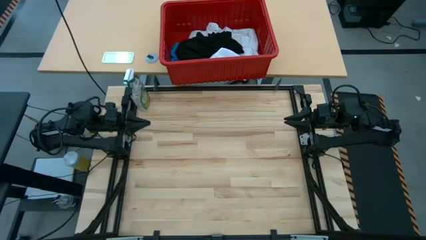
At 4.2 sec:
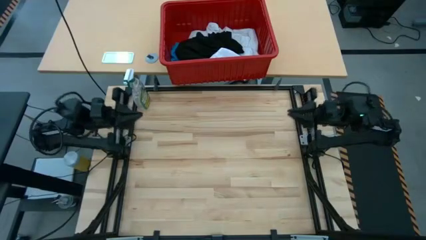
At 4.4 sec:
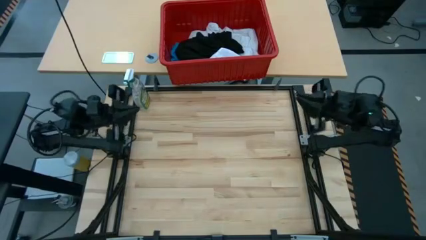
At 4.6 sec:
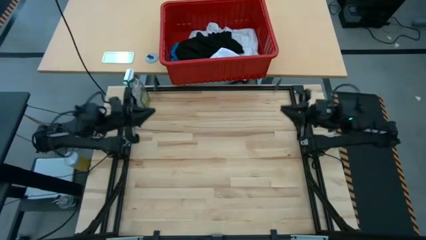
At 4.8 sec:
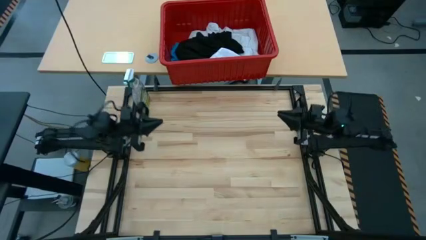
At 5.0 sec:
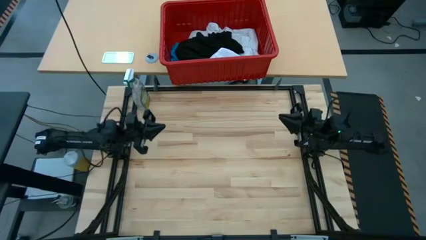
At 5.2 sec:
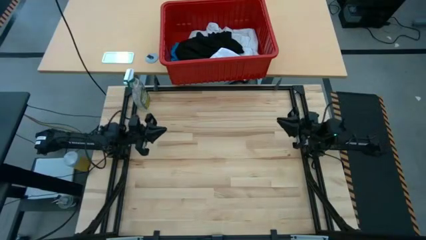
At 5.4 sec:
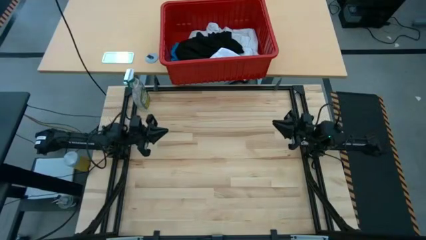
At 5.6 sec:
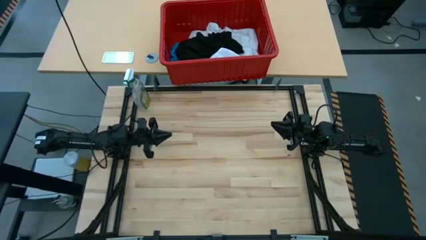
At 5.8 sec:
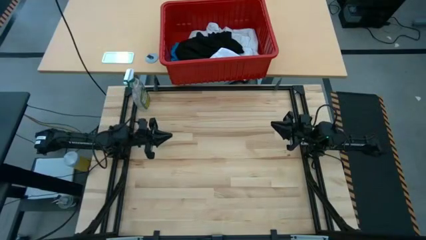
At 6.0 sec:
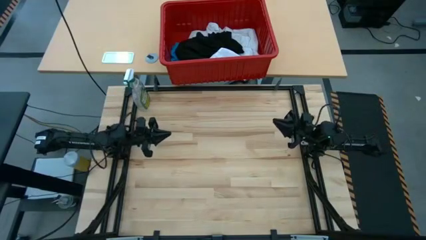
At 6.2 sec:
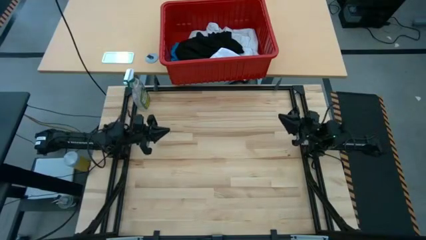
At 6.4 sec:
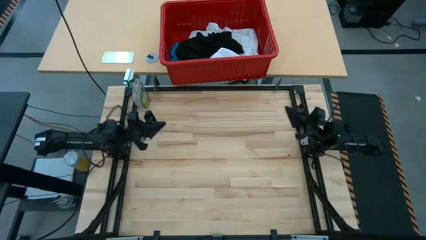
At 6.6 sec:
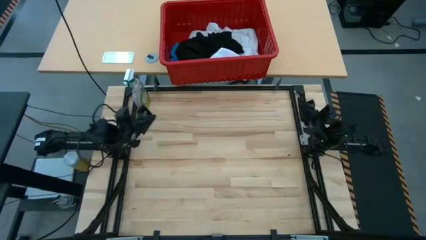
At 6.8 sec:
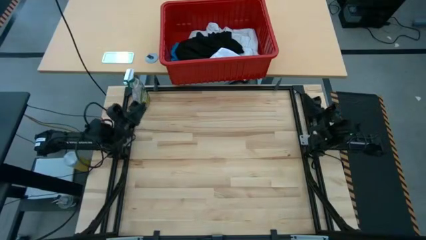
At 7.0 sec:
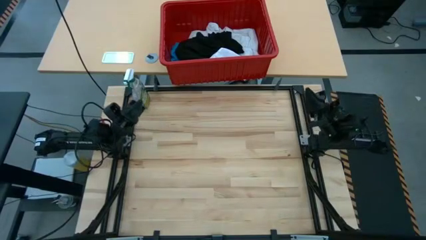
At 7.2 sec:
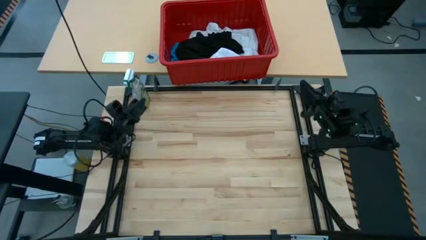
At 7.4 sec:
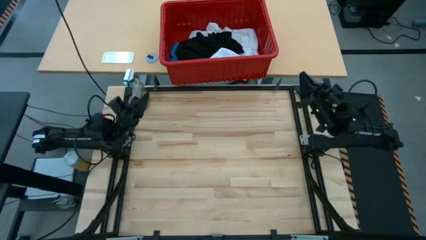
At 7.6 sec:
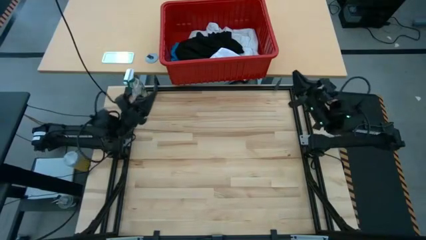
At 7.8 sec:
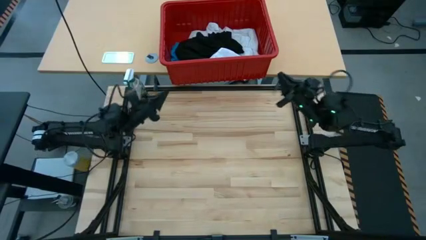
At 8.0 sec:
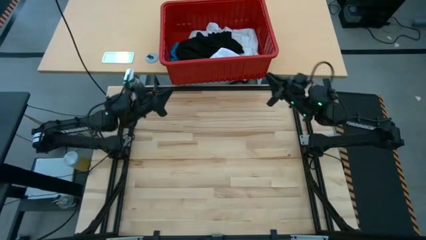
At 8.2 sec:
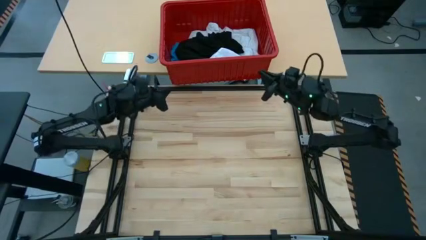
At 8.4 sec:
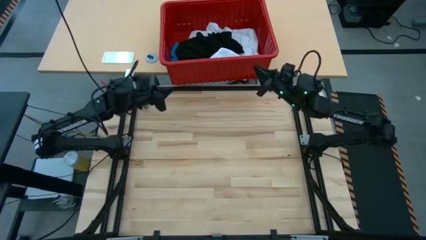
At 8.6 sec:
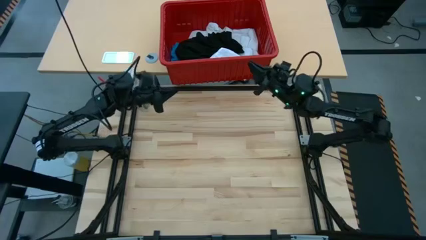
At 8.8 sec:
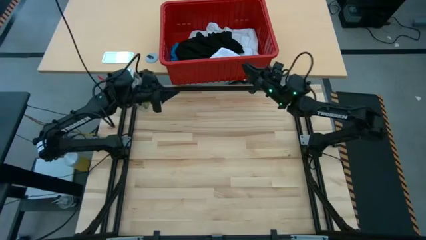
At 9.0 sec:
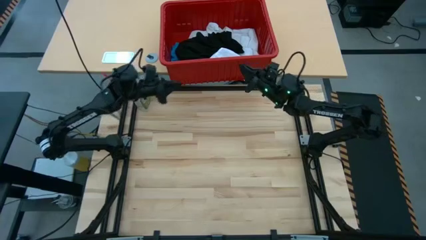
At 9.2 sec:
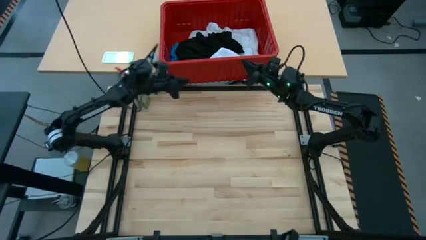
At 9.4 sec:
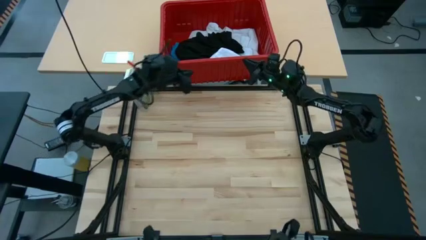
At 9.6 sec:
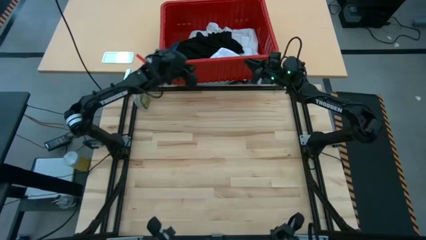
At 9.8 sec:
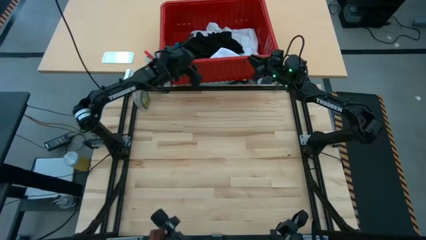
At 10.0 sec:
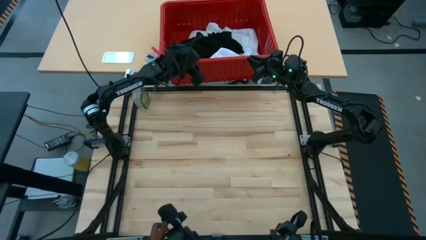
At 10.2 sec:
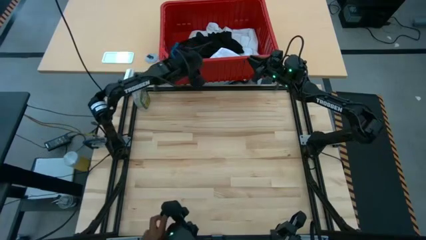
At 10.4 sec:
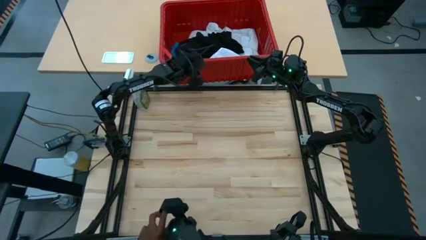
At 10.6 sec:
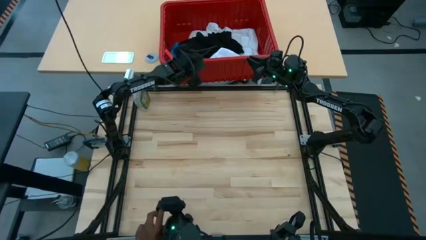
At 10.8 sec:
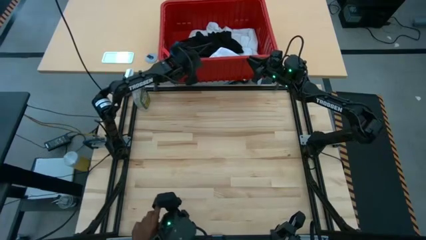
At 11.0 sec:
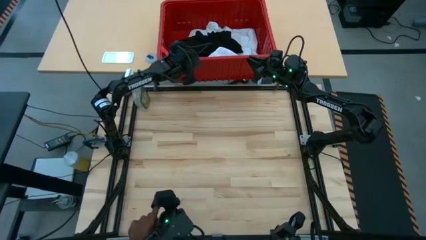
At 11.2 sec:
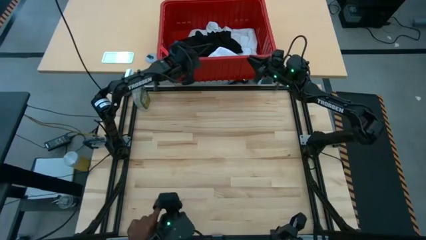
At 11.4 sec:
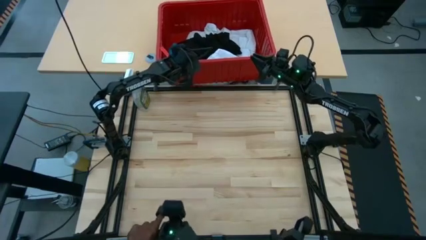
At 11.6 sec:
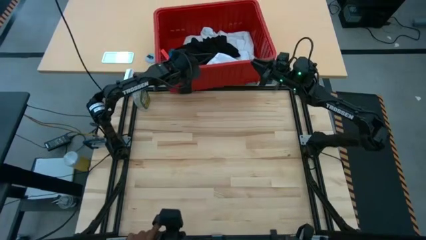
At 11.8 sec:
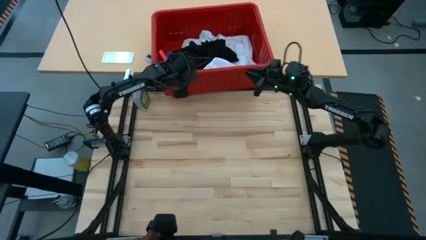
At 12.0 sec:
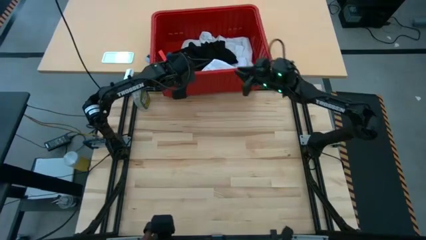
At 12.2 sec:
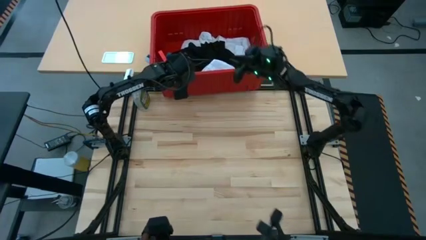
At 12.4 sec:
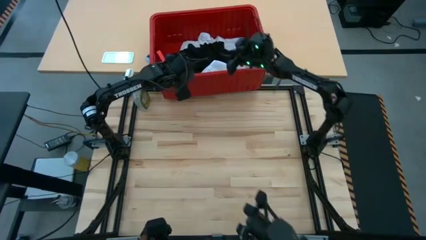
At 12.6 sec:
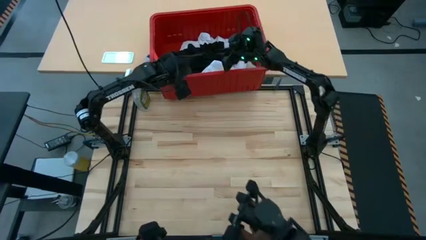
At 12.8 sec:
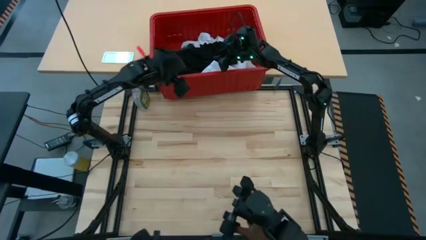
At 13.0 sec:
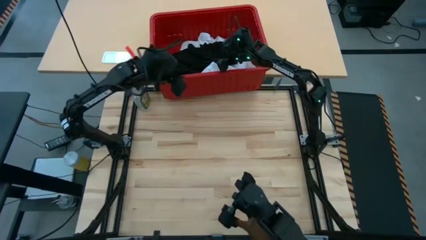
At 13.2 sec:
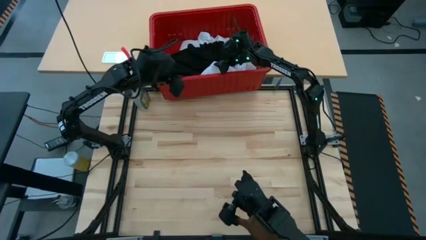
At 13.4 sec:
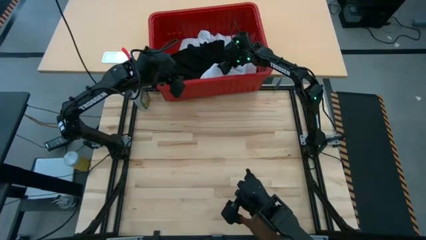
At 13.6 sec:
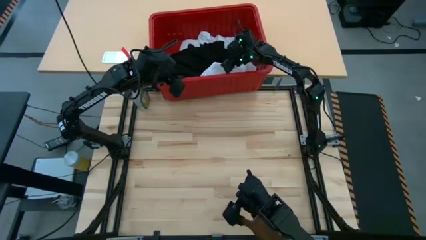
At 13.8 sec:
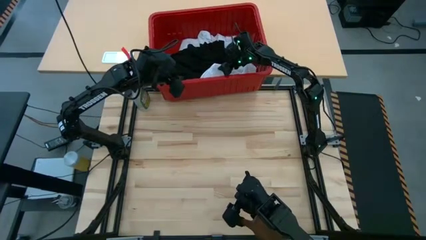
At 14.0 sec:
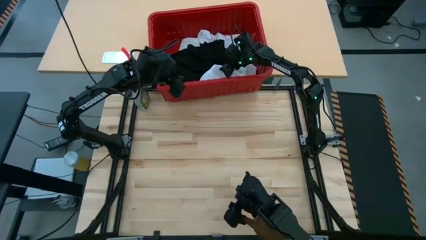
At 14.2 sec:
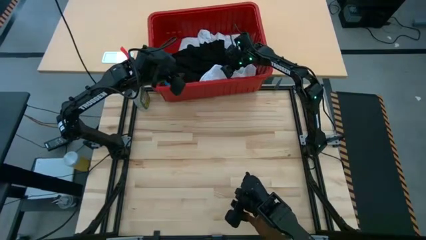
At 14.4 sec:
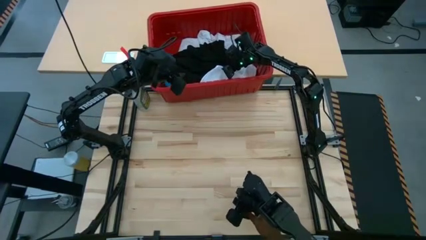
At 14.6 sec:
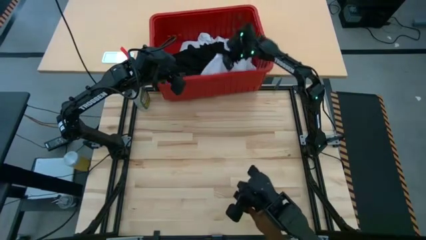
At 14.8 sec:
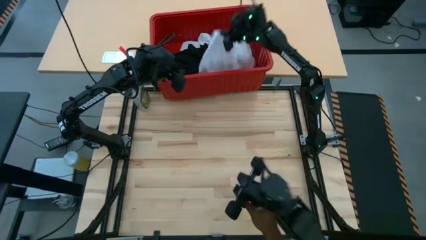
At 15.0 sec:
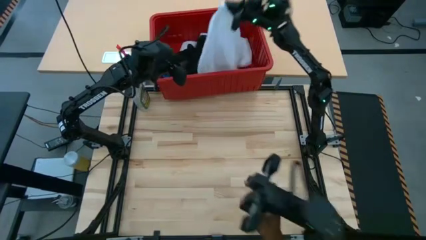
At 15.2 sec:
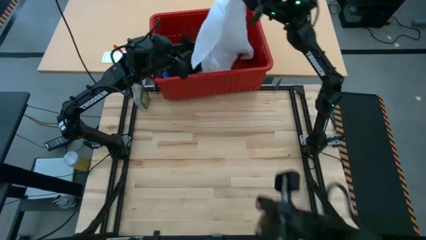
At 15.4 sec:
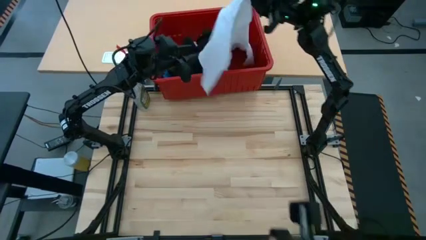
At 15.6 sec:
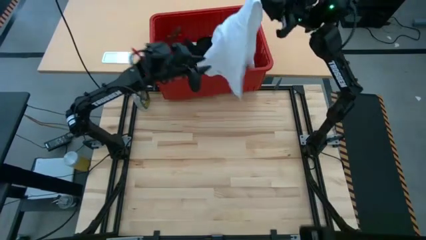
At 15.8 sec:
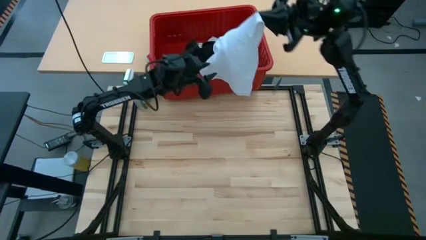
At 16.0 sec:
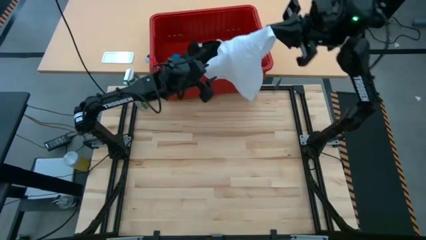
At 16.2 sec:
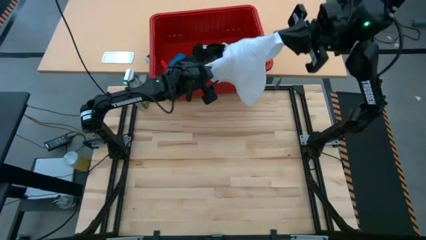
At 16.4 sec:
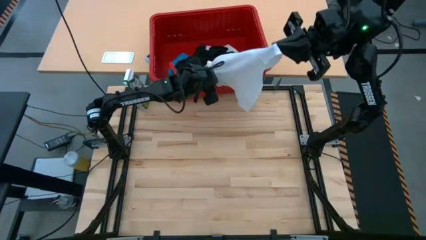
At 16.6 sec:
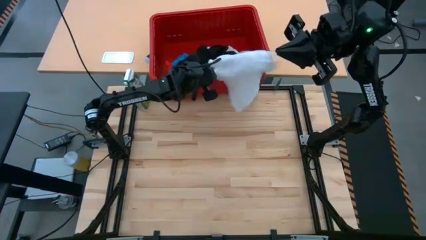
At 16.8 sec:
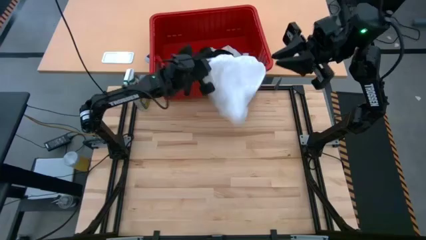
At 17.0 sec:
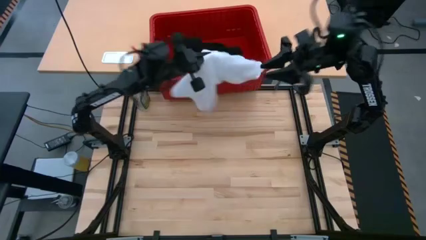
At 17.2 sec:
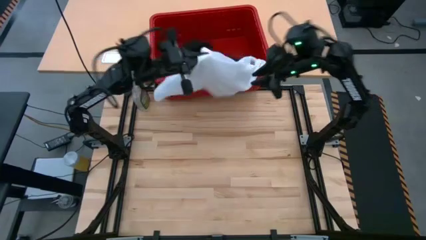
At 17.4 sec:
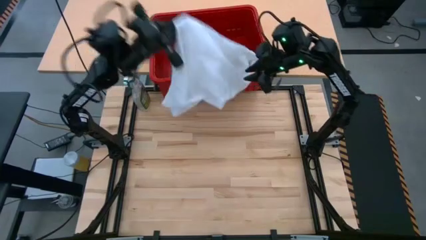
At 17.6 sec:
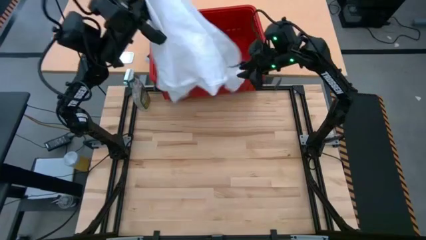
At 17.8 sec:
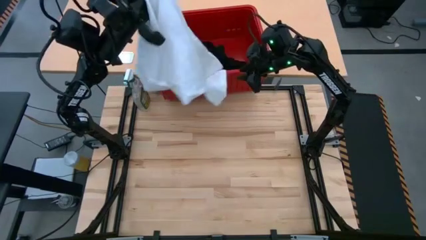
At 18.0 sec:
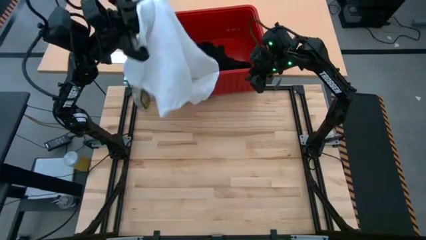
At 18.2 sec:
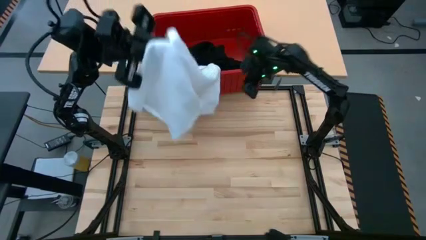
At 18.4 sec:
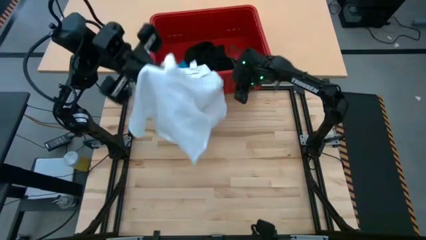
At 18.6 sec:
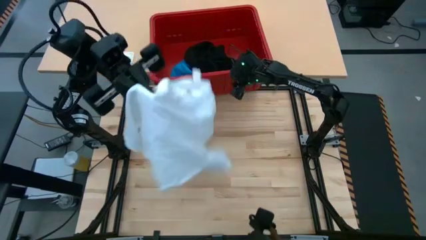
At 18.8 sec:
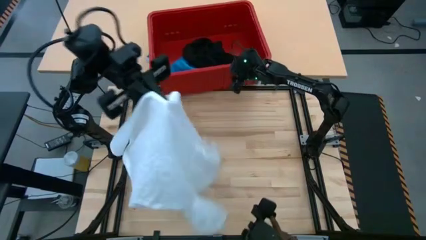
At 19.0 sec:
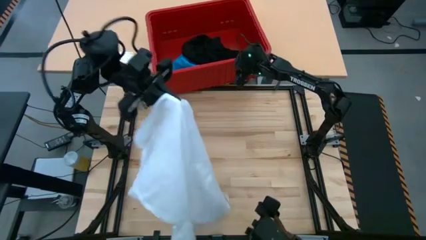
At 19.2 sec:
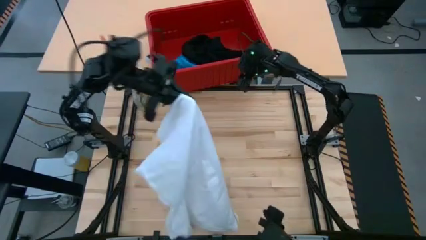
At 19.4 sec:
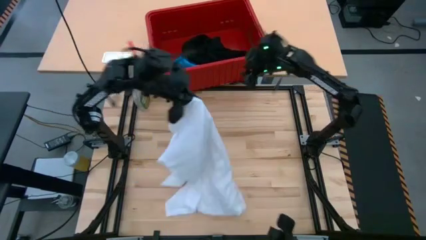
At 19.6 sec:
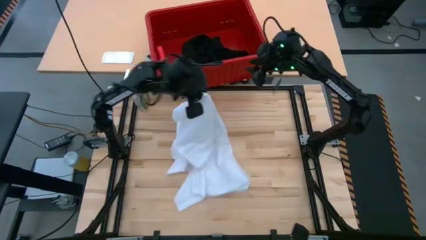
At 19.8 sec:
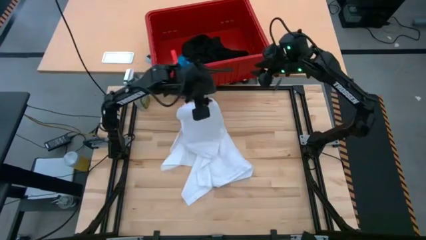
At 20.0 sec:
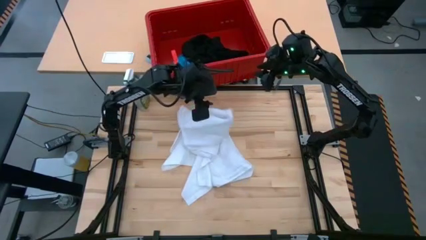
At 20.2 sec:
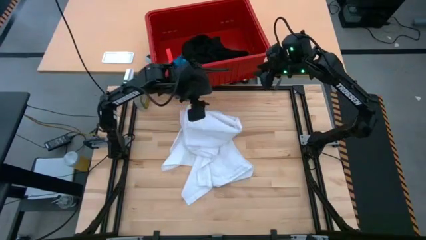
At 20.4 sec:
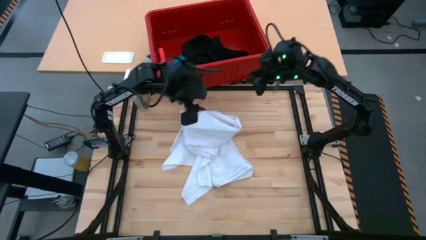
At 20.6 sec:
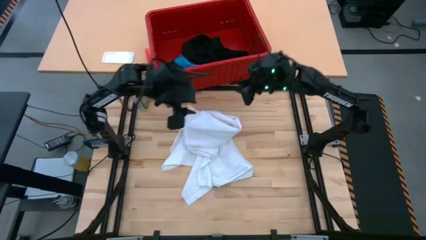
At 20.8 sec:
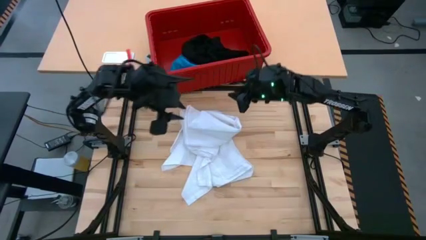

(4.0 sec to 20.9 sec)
Task: Fold laundry
Fold the white polo shirt
